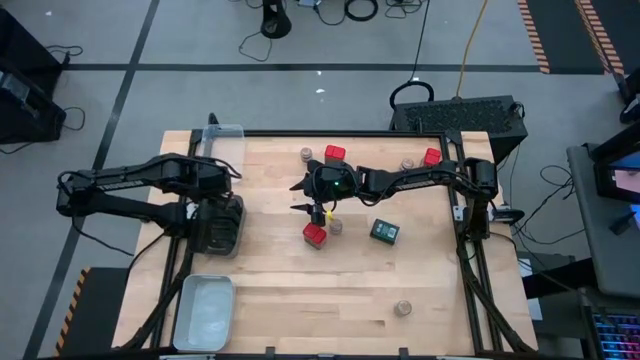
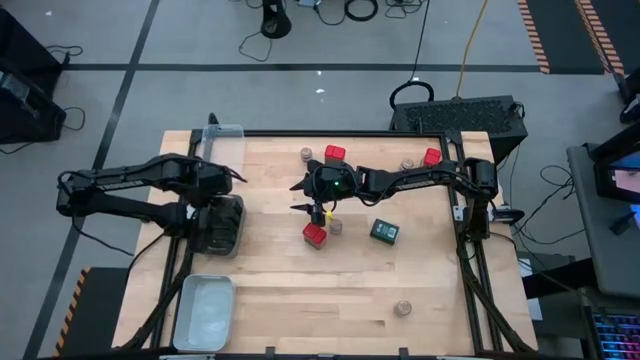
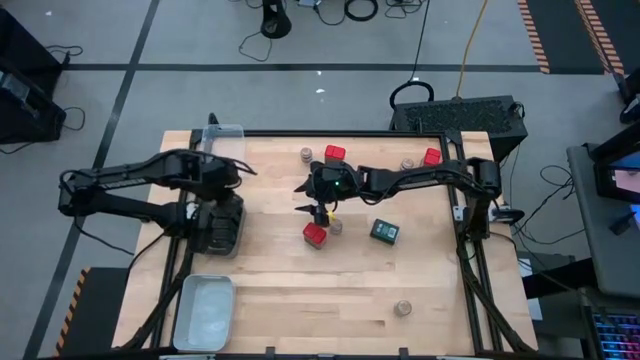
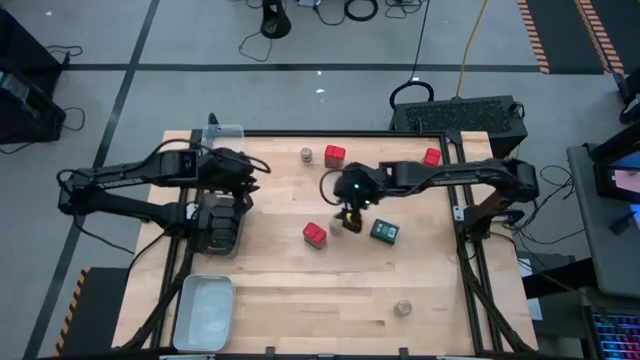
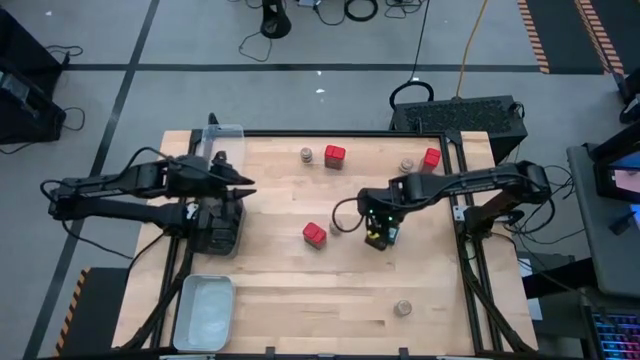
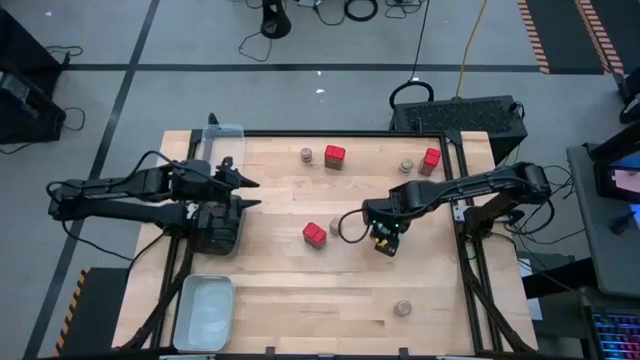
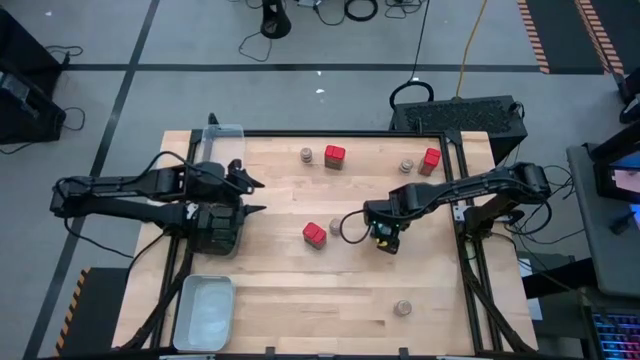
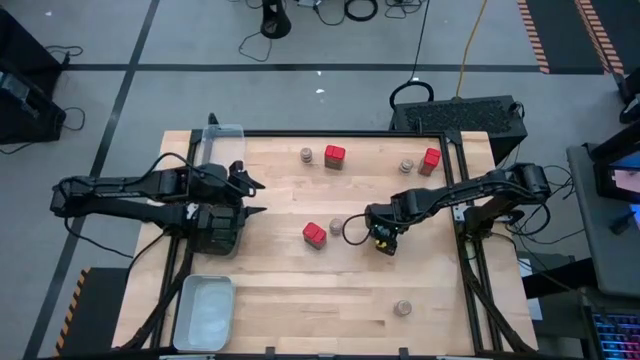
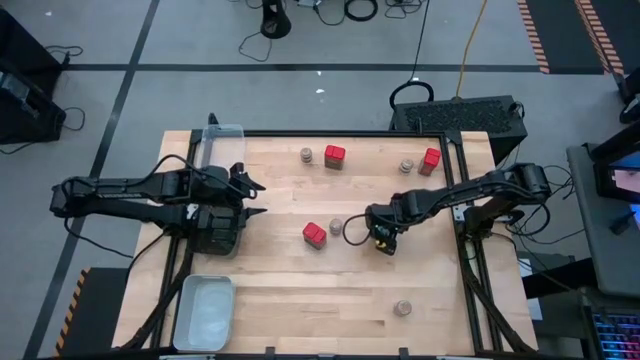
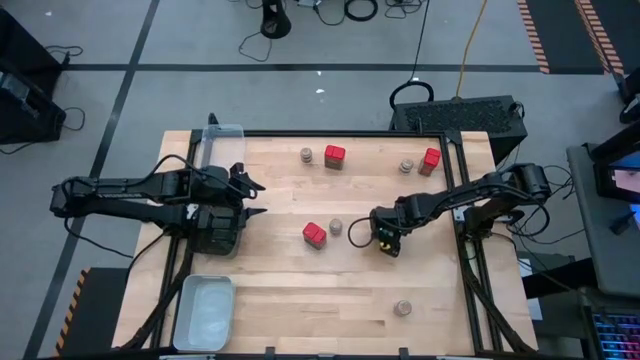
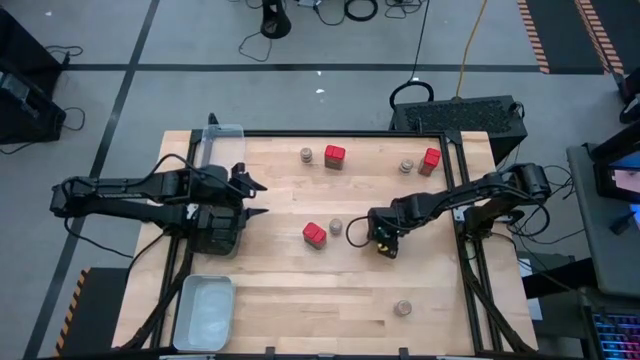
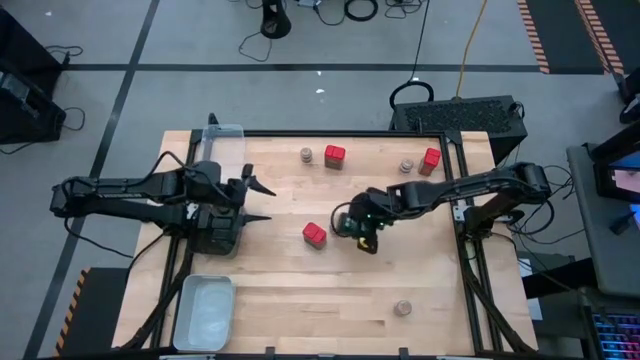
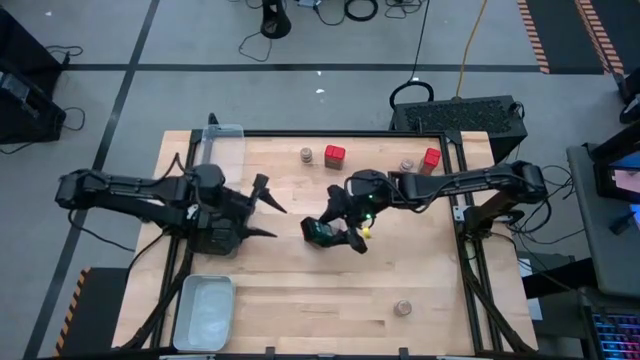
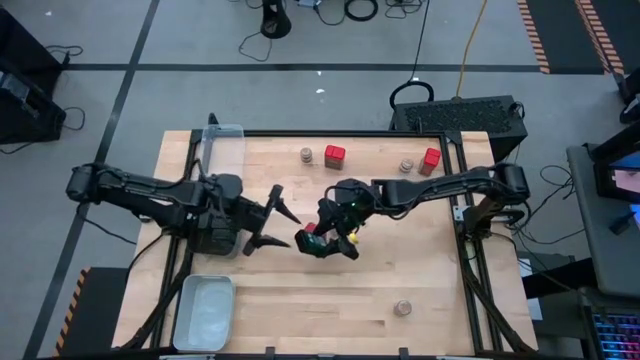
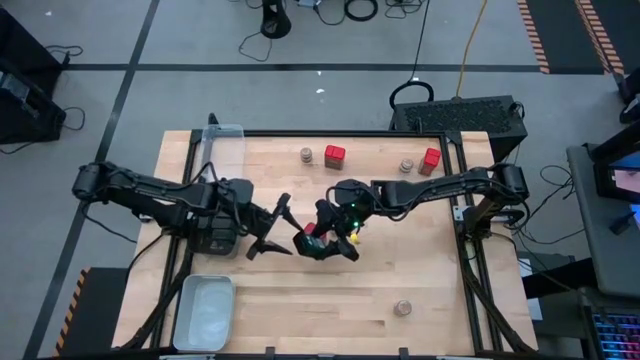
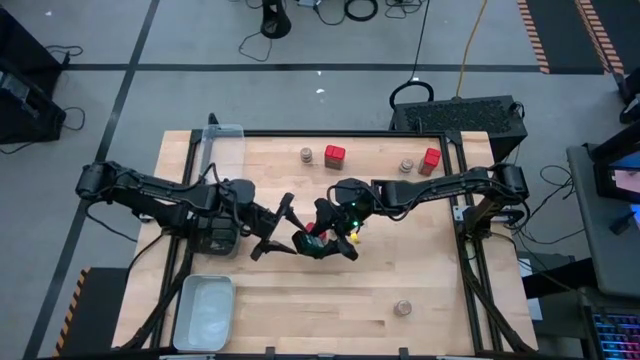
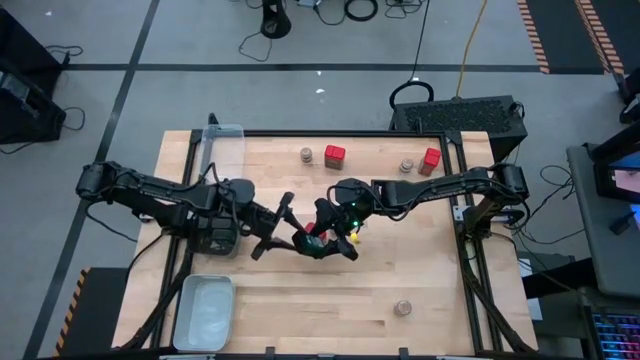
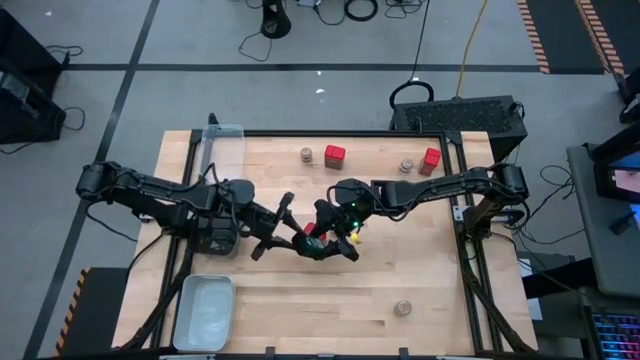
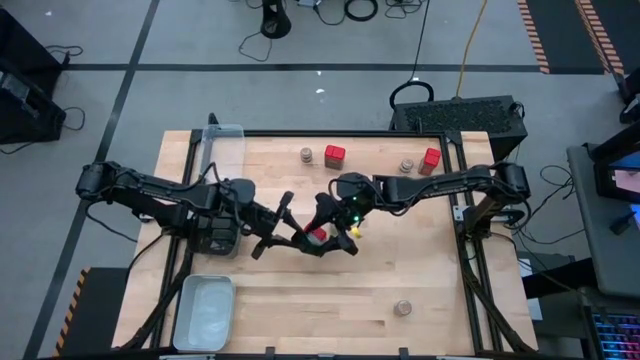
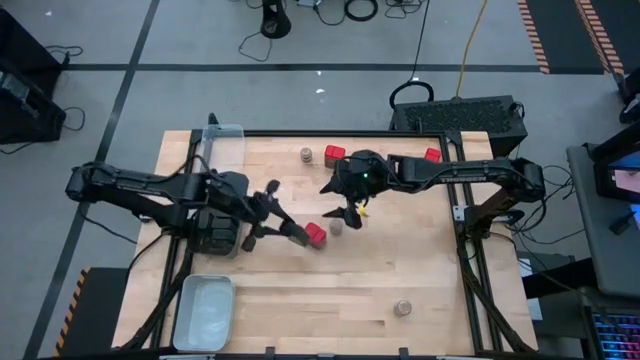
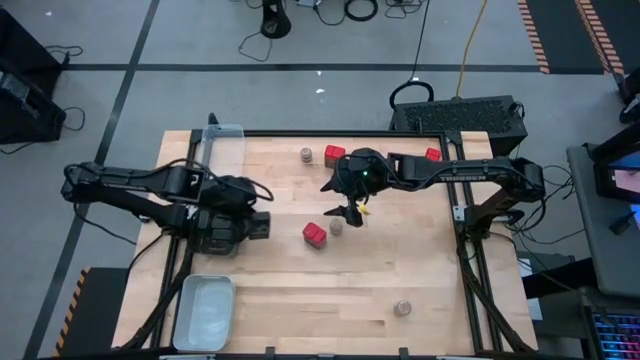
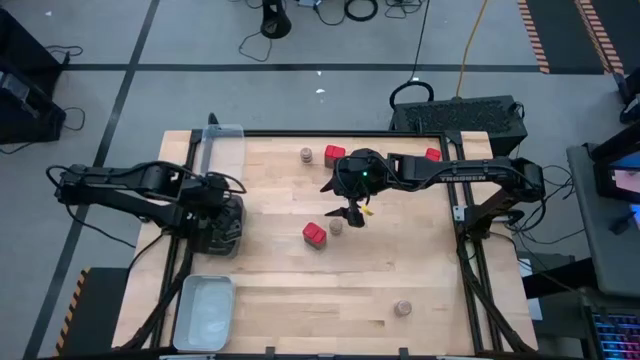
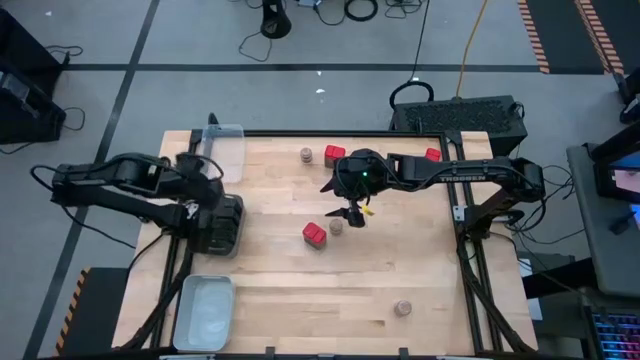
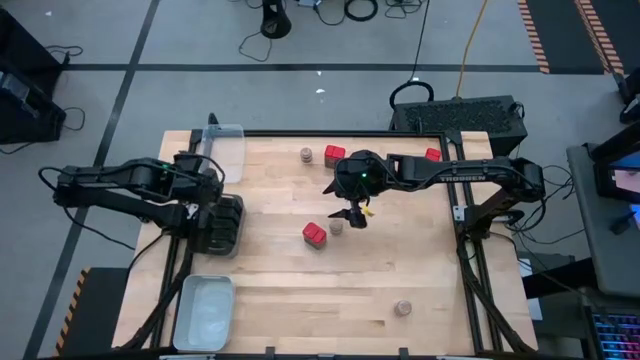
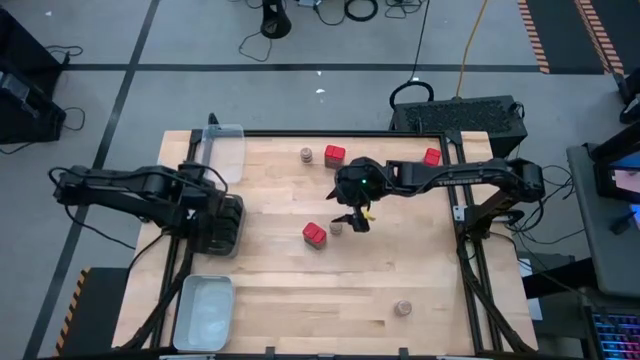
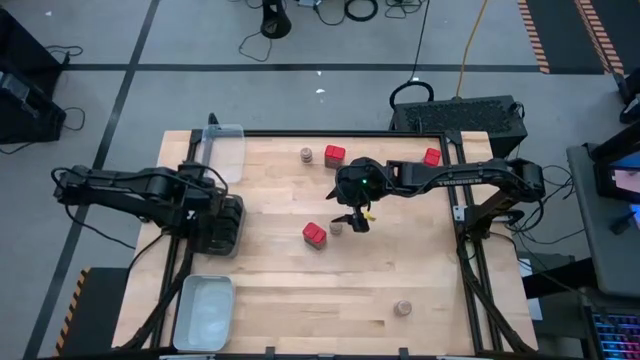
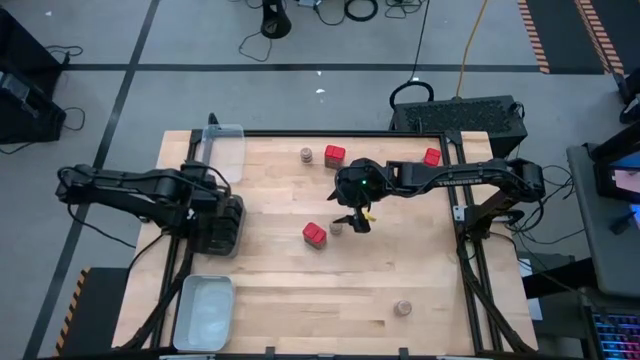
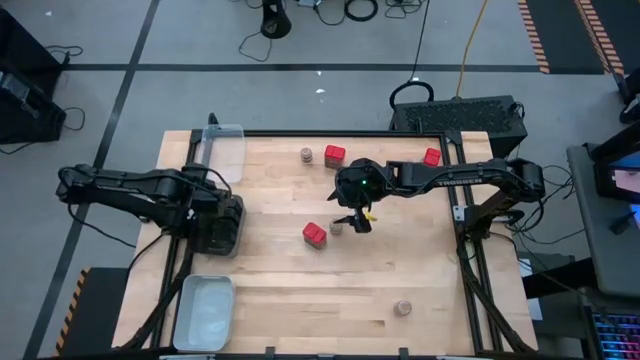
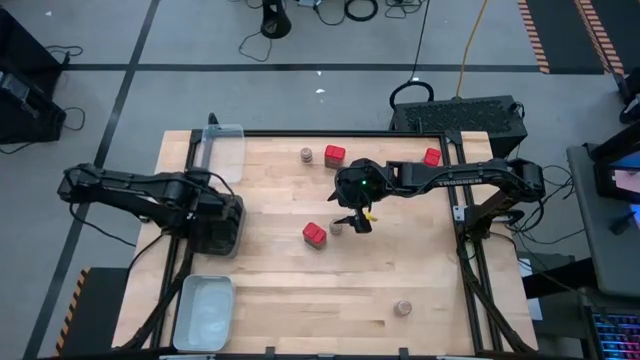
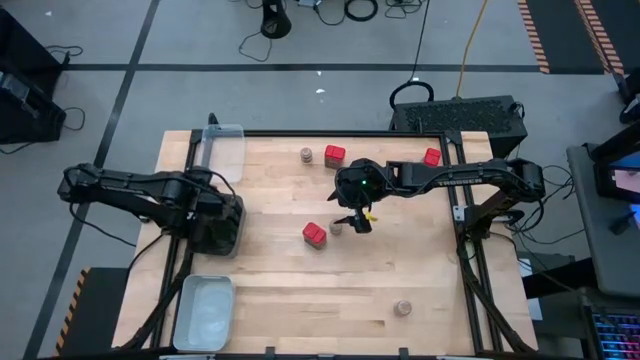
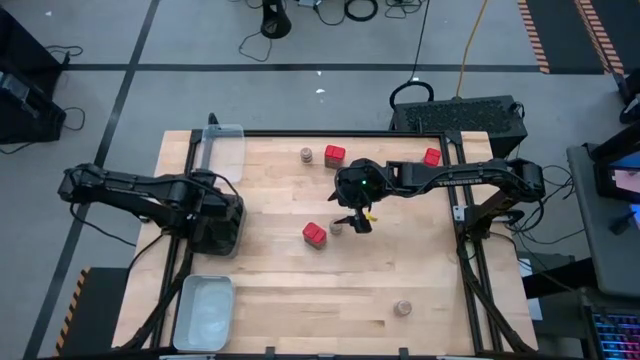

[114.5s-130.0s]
Task: Sort spices by type
Put the black seasoning can into the black bin

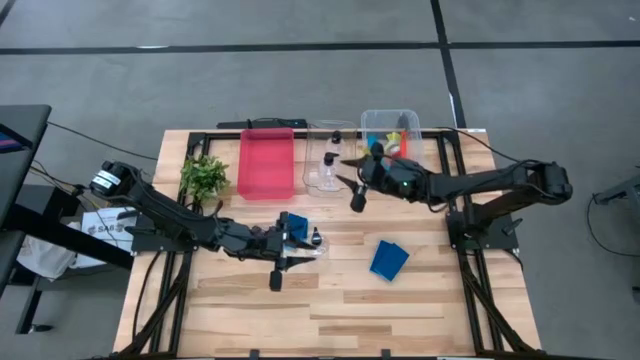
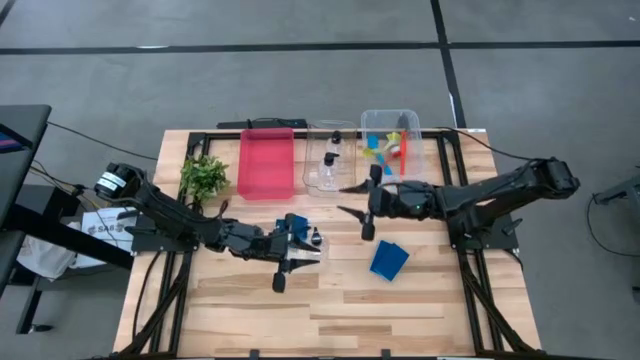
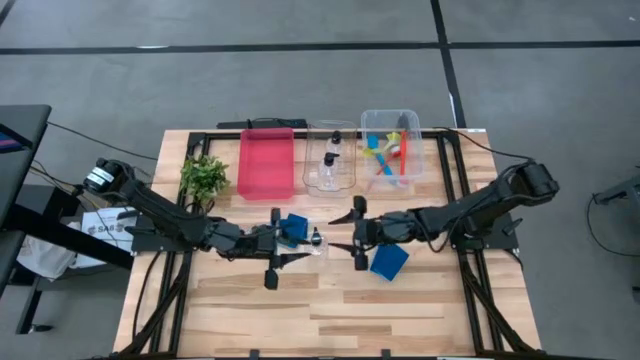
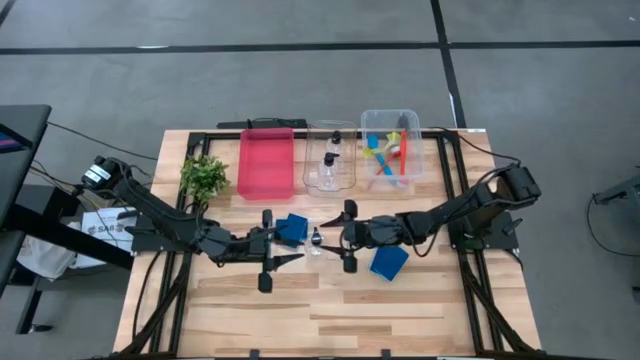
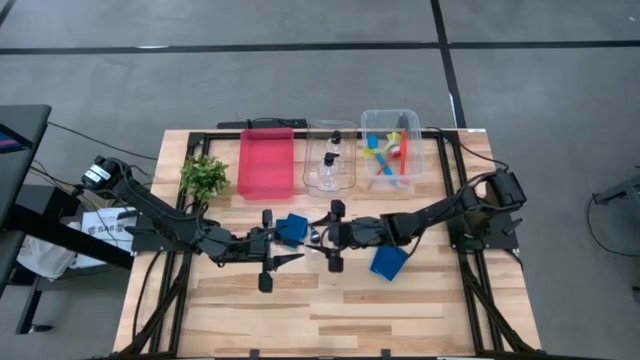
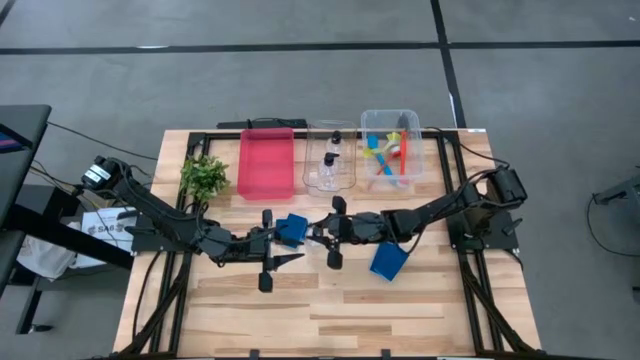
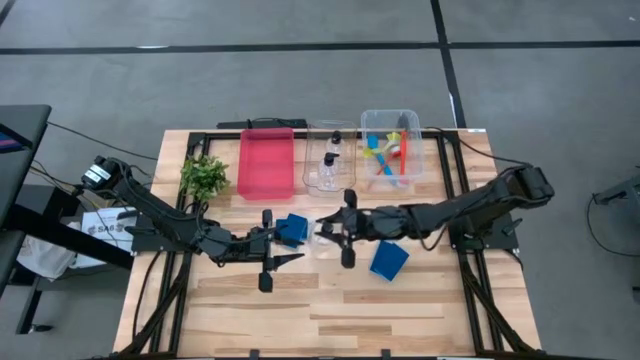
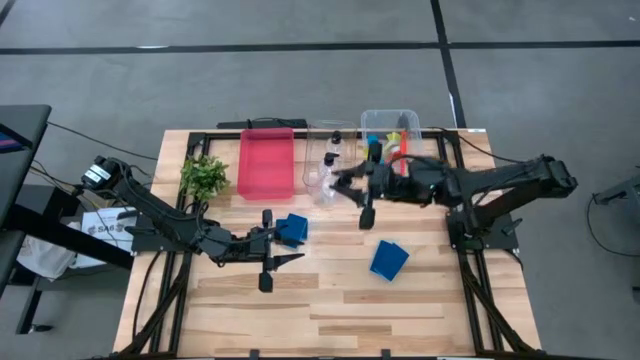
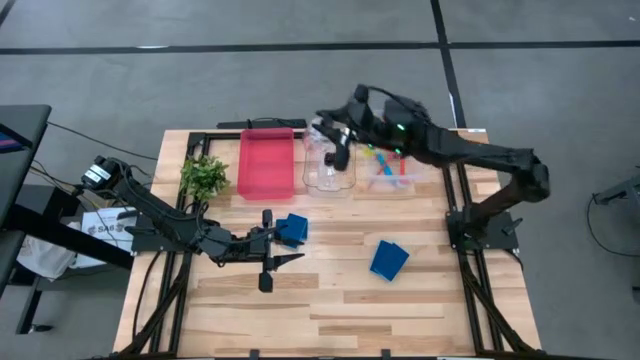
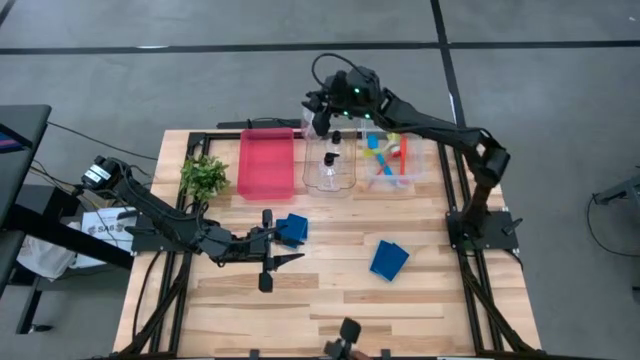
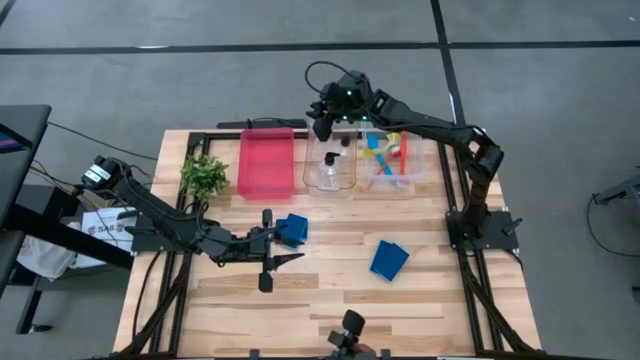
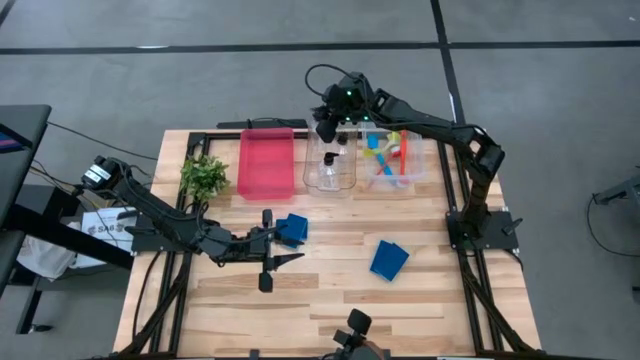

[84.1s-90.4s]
Task: Pick & Place Kitchen Sink Supplies
Put the soap dispenser into the transparent bin

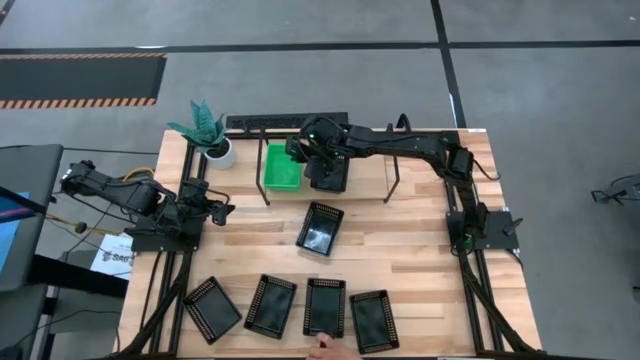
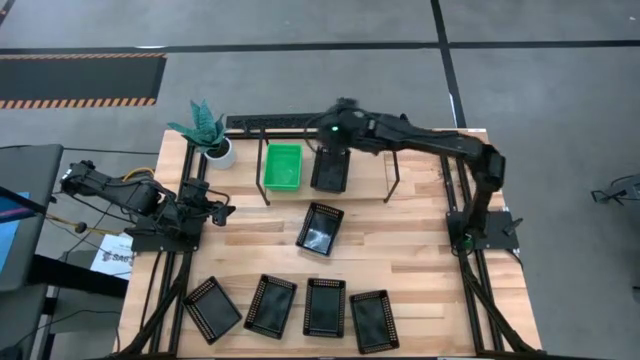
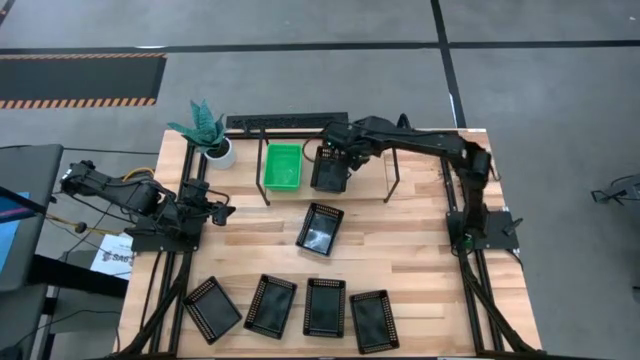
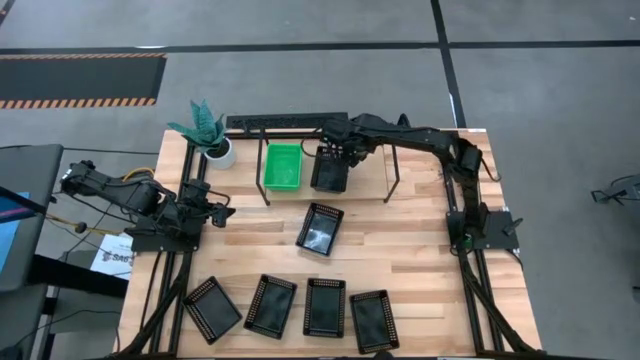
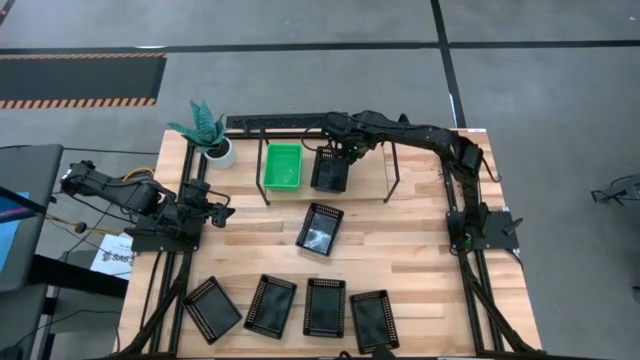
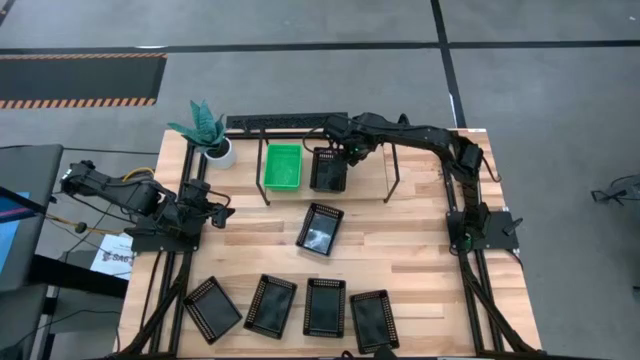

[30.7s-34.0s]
Task: Stack baskets on shelf by color
Adjust the black bin on the shelf
